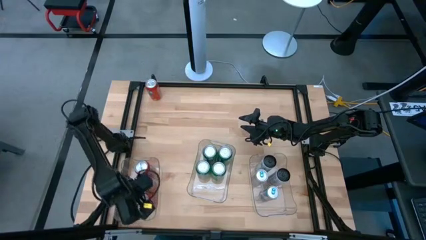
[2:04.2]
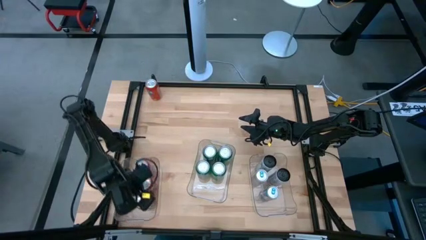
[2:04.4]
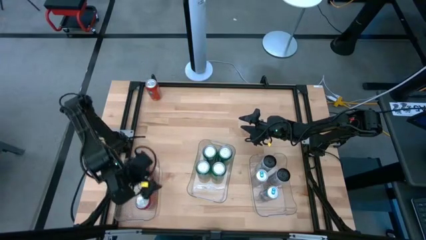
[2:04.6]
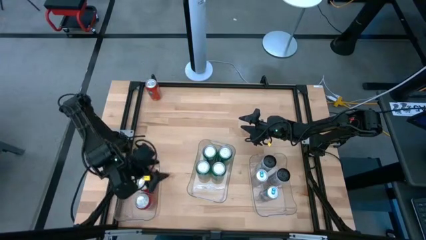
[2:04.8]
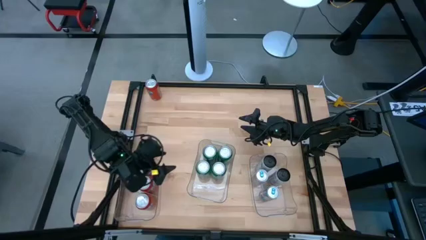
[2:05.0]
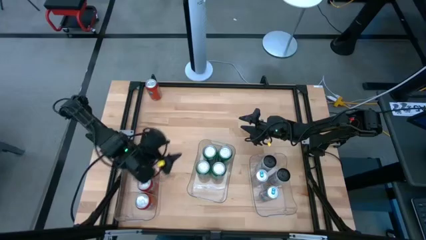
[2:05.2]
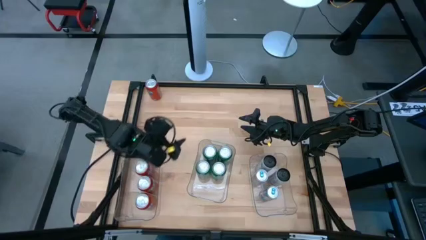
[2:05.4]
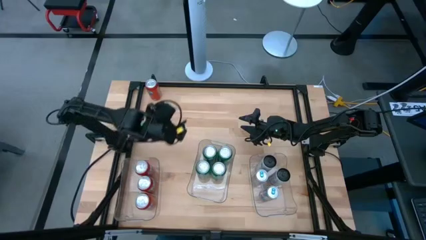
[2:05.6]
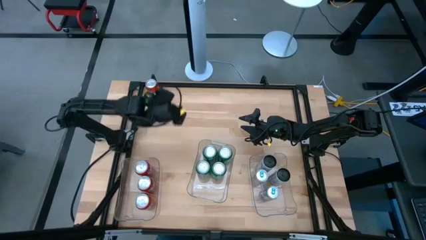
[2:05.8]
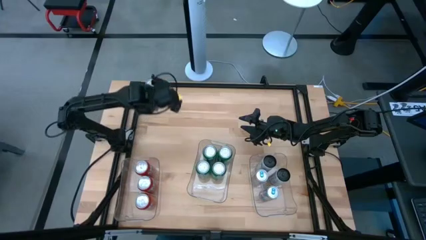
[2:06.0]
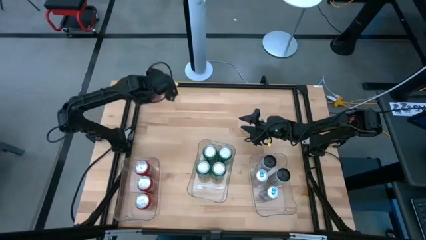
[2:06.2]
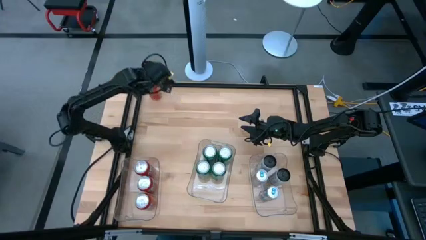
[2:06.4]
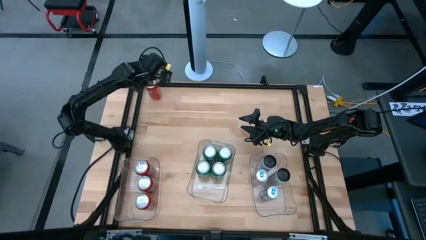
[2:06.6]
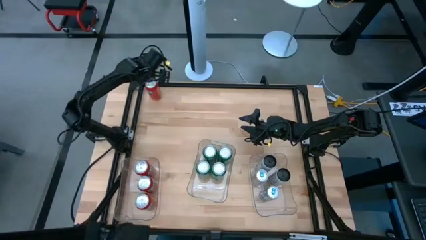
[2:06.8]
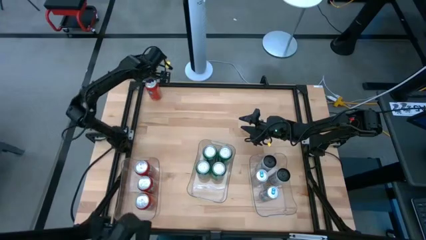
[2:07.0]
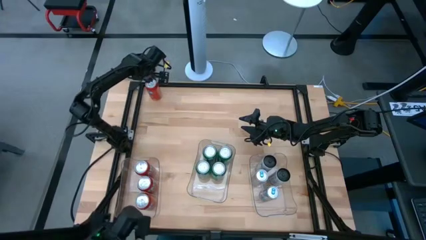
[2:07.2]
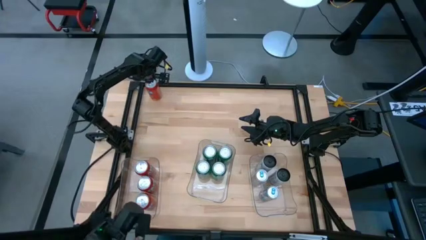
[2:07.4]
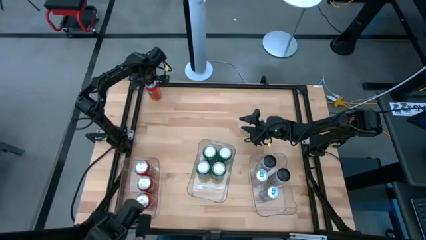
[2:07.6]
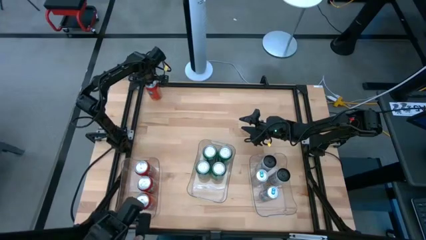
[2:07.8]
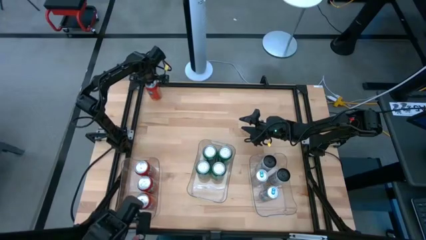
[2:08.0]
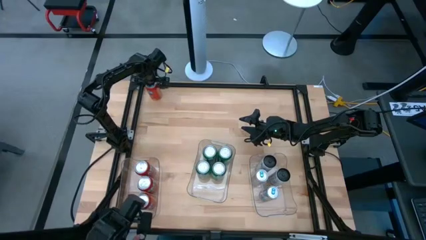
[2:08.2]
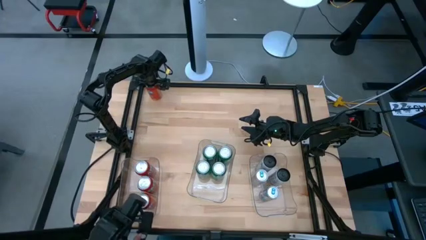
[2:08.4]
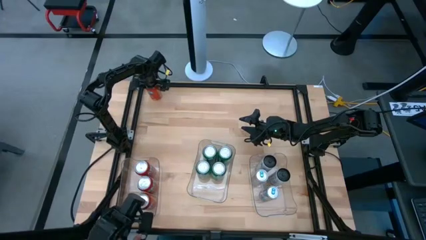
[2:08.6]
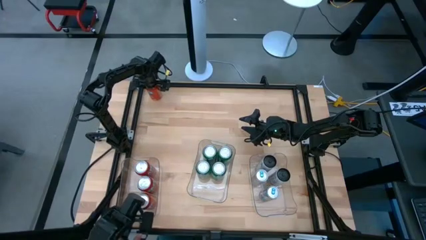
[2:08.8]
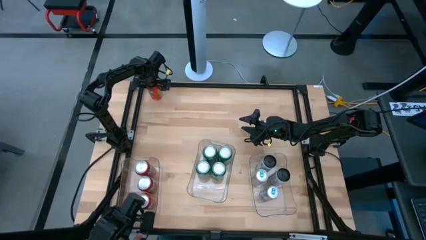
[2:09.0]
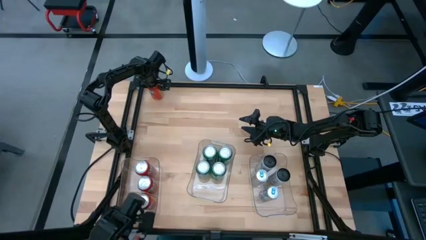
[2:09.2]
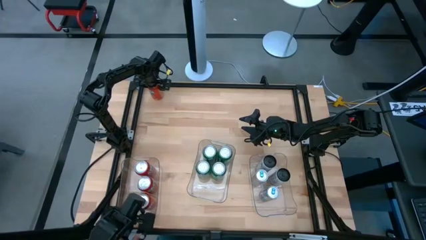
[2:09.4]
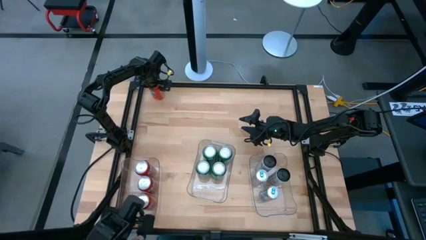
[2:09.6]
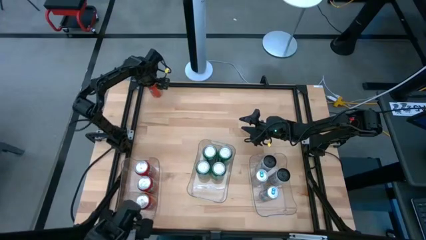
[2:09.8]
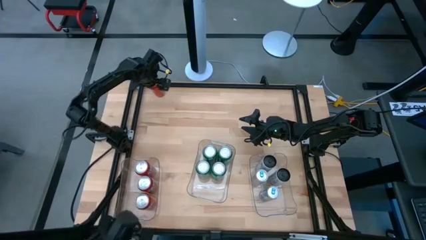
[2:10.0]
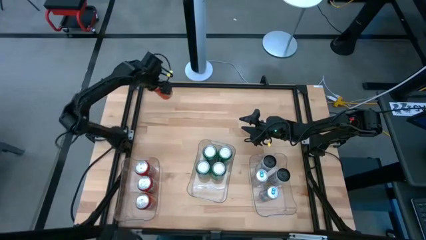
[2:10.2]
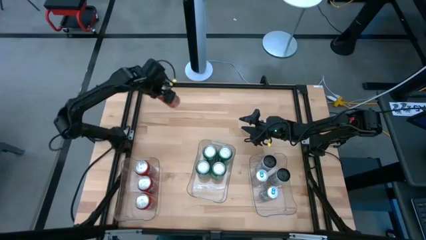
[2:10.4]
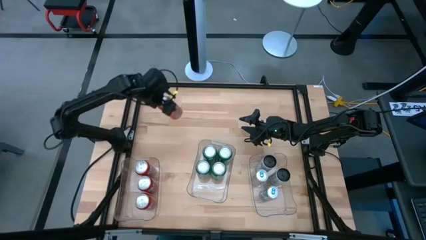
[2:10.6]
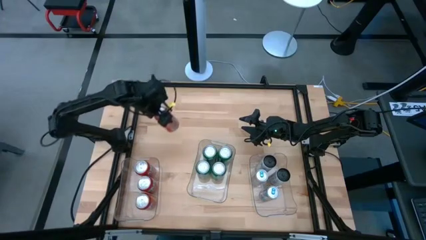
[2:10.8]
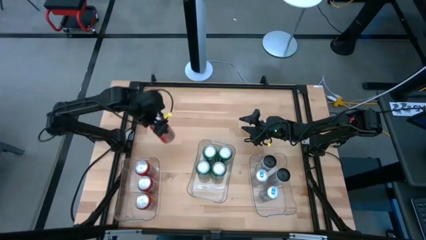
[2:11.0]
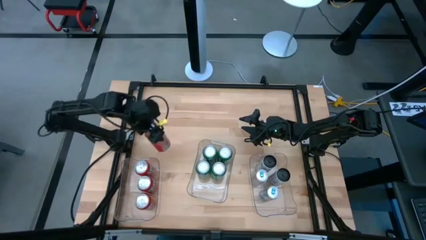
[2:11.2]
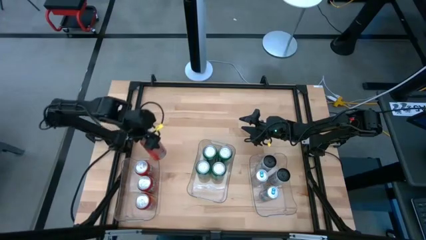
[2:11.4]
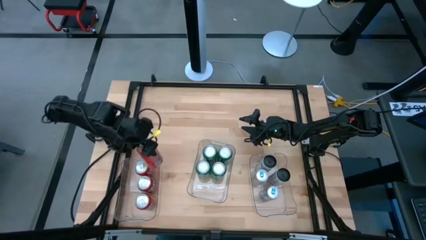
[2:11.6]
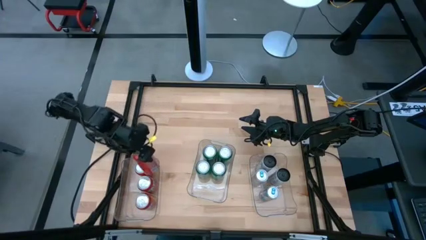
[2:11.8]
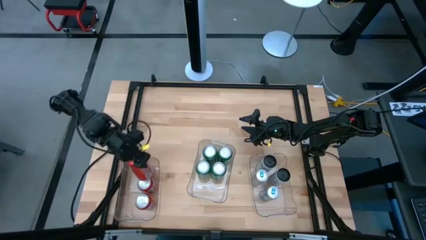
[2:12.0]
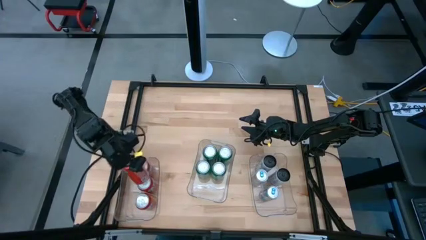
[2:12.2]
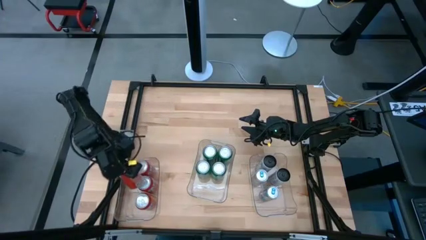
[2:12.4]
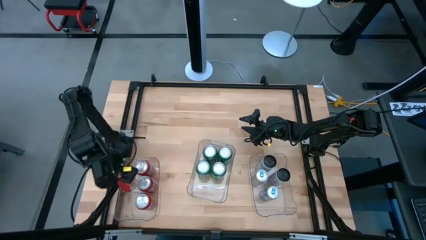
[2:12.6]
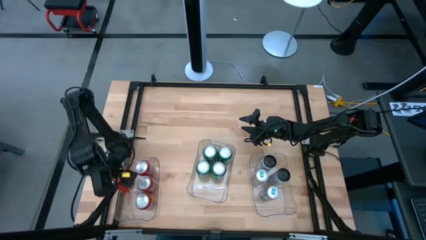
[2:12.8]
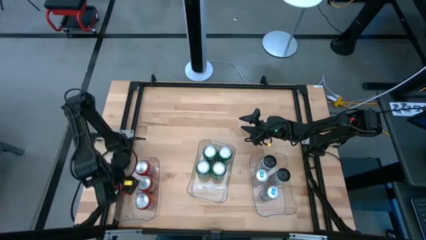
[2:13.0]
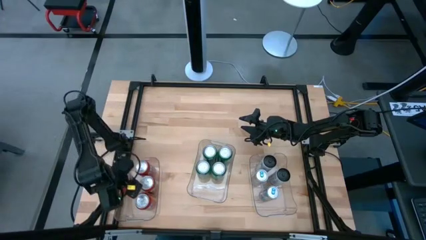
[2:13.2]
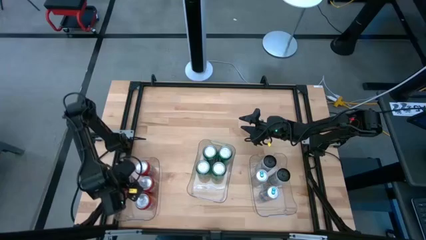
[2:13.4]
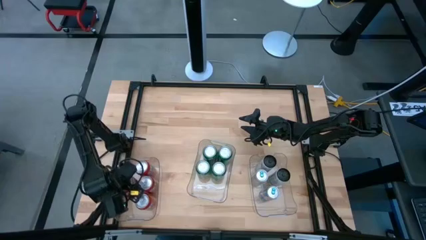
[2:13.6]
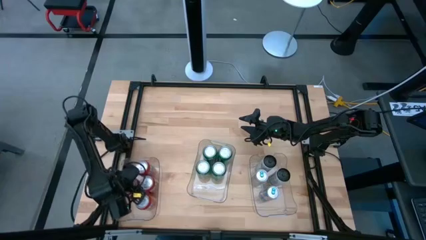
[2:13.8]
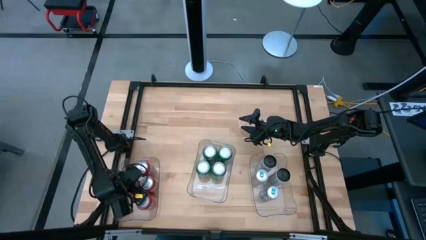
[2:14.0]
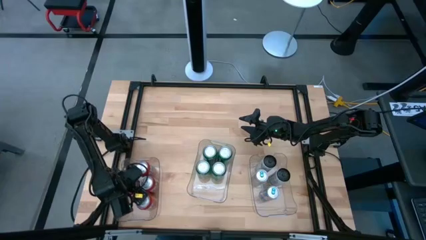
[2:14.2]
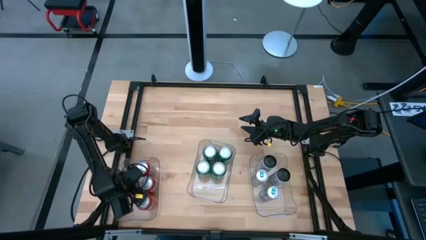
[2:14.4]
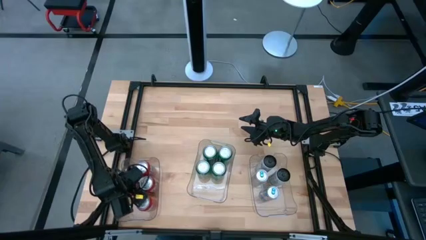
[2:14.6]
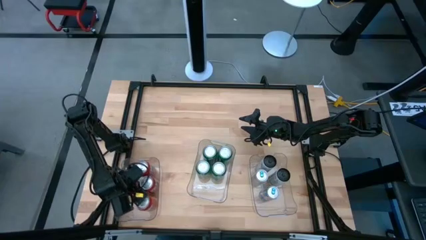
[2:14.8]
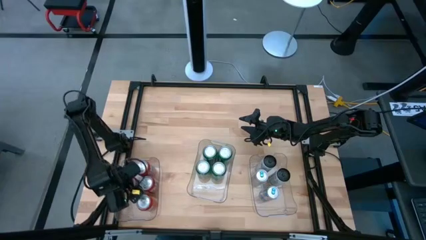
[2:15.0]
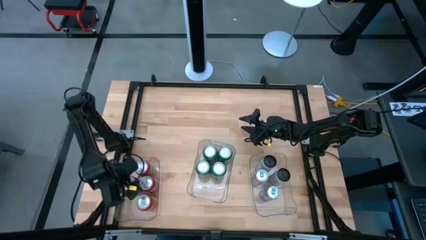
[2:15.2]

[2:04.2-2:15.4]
Task: Sort soda cans
Put the red soda can into the left transparent bin

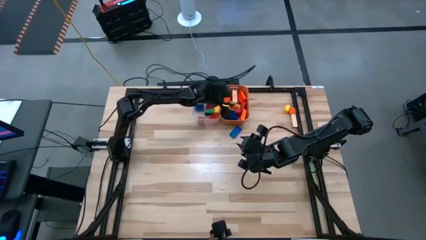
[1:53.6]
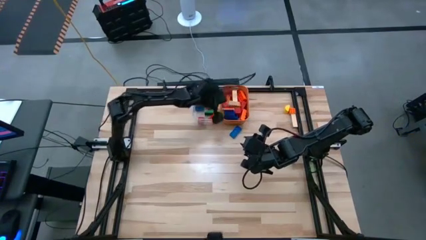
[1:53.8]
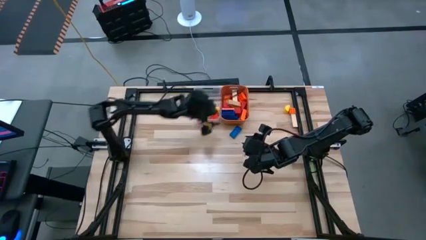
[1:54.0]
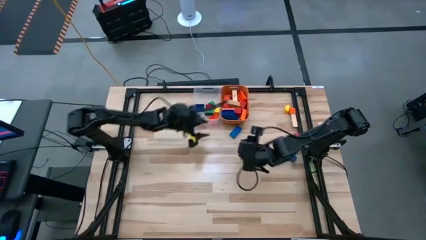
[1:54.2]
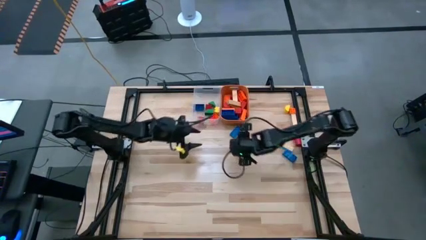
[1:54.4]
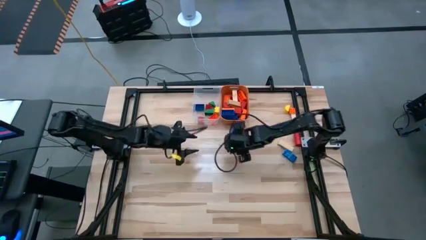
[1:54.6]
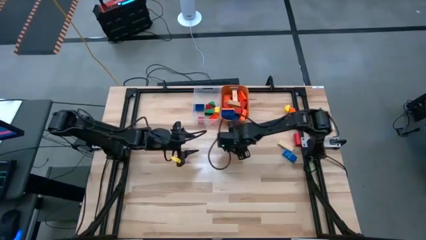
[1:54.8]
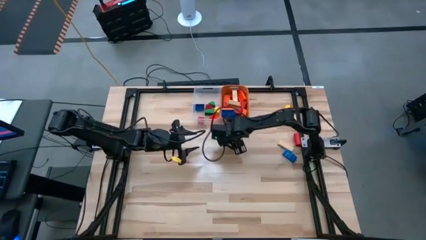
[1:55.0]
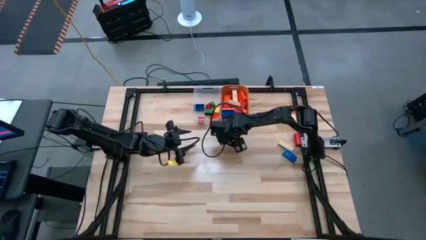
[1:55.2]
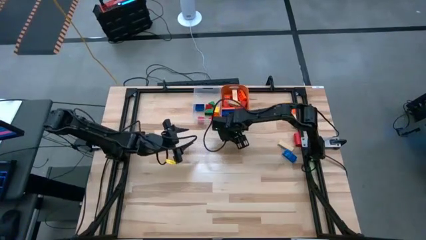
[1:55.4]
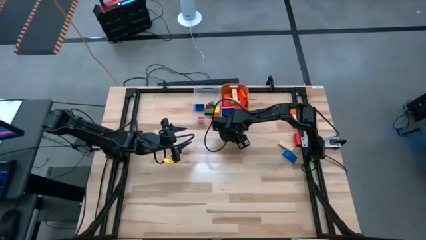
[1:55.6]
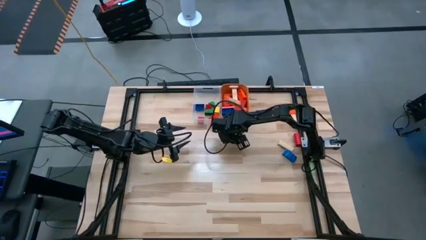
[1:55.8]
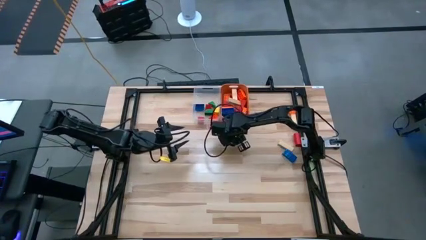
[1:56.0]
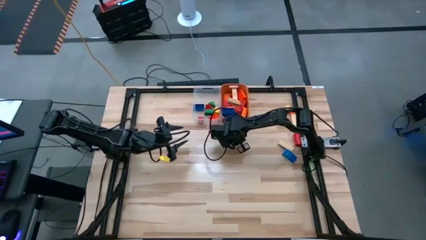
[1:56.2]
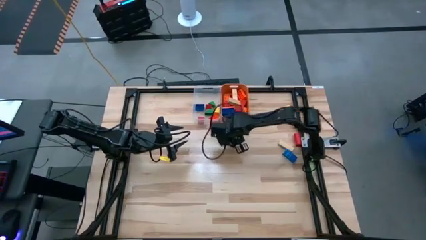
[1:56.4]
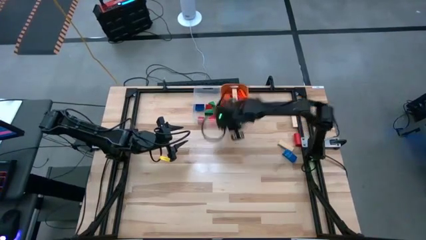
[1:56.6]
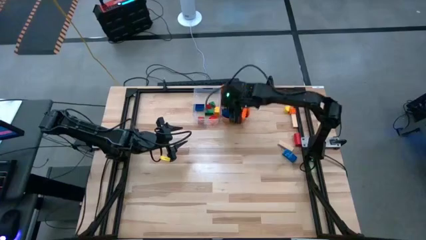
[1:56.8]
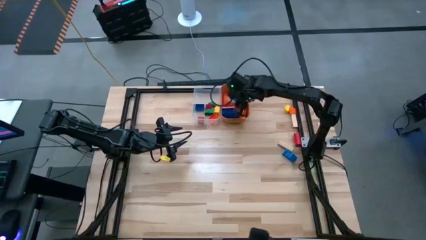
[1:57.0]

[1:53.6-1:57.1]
Task: Sort blocks by size
Put the blue rectangle game piece into the orange bin

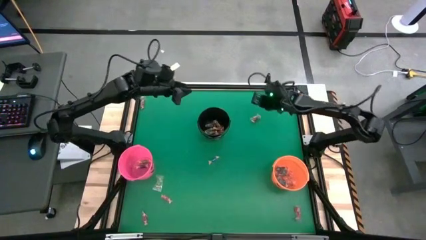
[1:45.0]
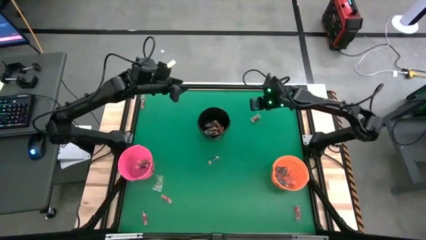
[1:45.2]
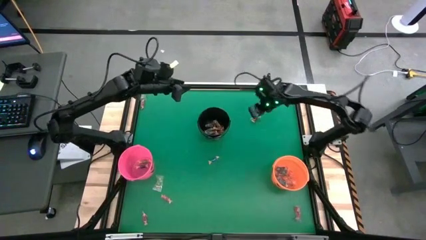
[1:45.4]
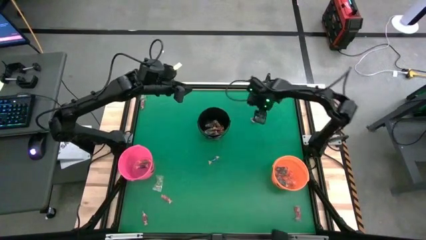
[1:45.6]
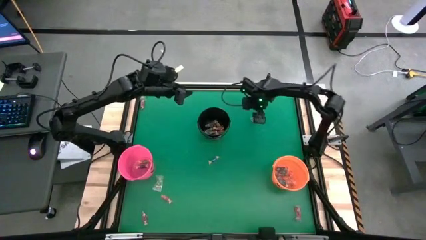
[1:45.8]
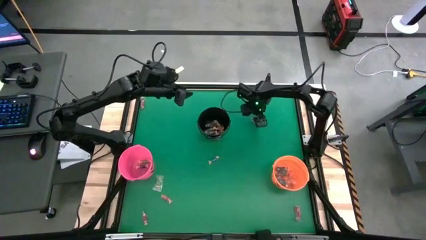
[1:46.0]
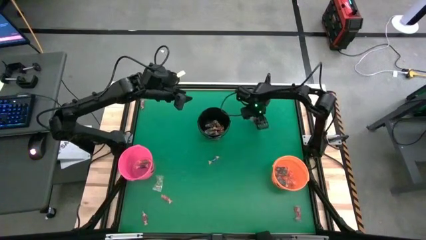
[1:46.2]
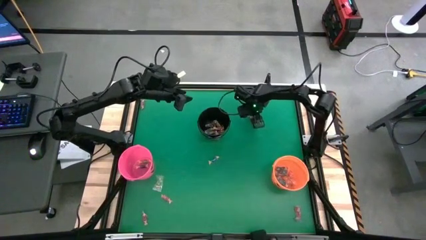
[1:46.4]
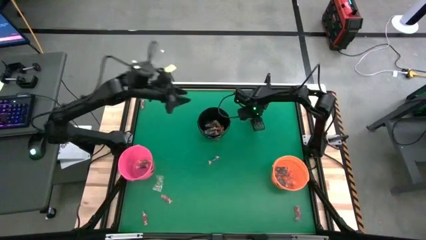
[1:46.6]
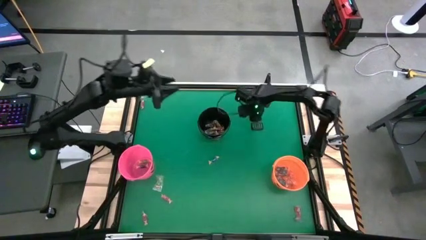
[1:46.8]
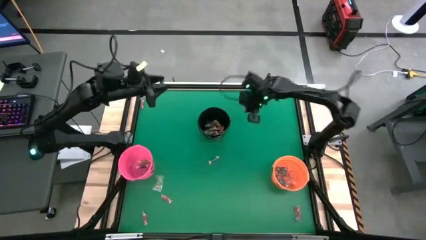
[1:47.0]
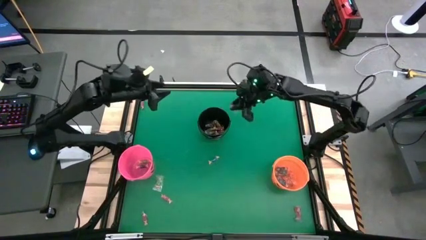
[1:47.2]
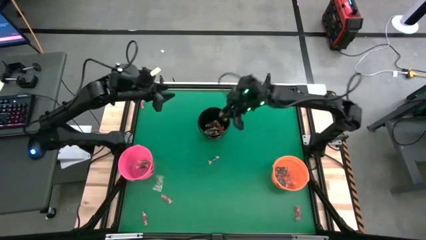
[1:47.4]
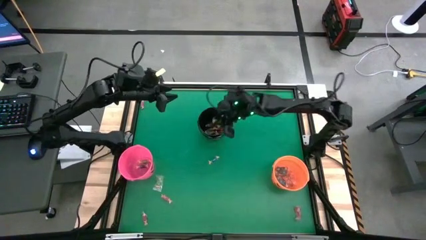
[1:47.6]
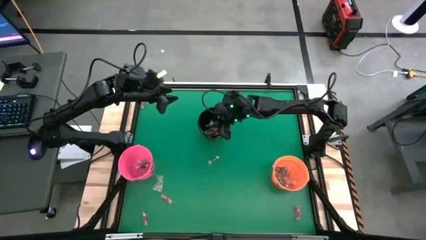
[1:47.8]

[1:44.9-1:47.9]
Task: Sort candy by brand, put in halloween buckets
Put the transparent candy into the black bucket
